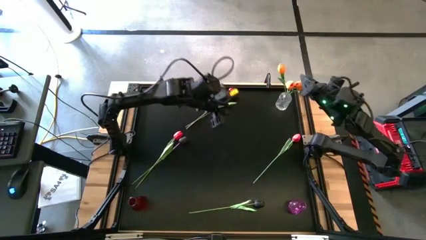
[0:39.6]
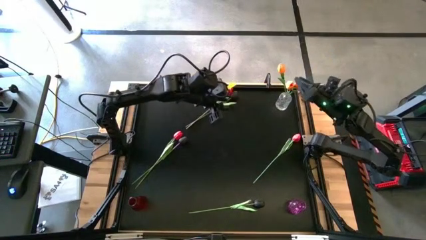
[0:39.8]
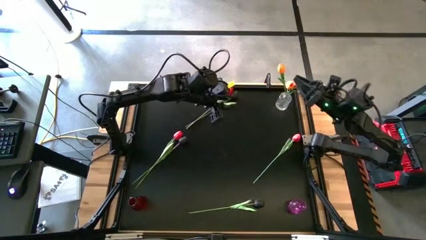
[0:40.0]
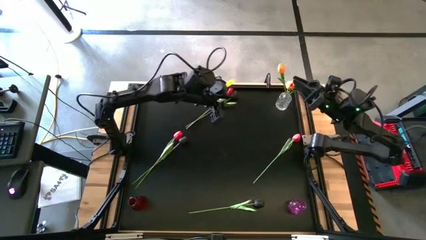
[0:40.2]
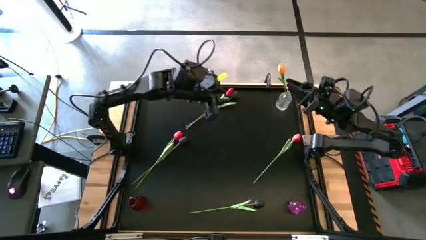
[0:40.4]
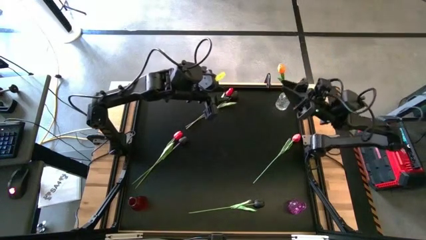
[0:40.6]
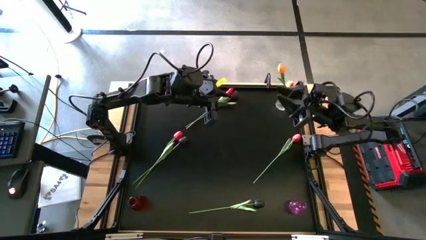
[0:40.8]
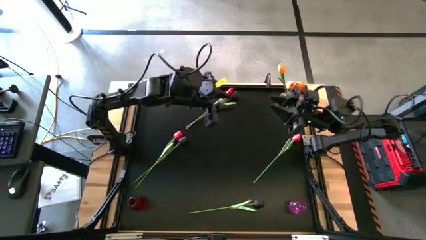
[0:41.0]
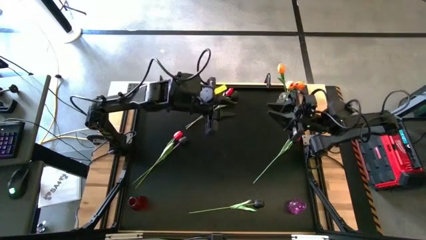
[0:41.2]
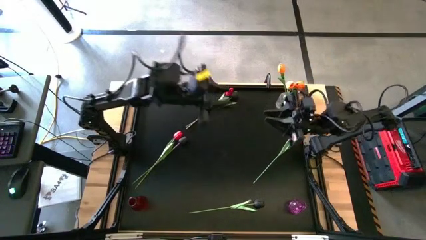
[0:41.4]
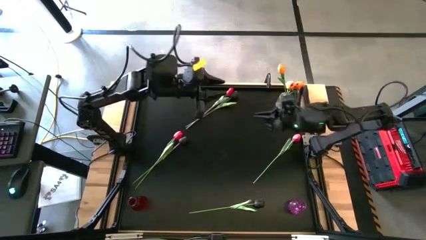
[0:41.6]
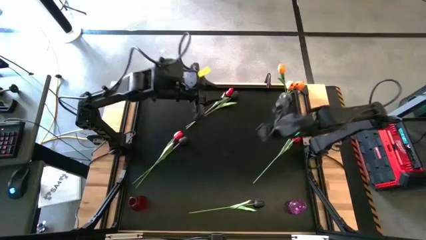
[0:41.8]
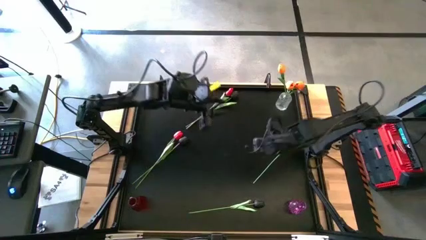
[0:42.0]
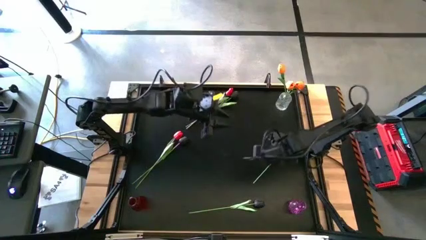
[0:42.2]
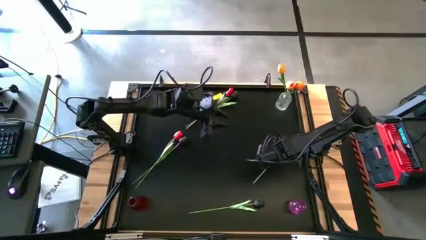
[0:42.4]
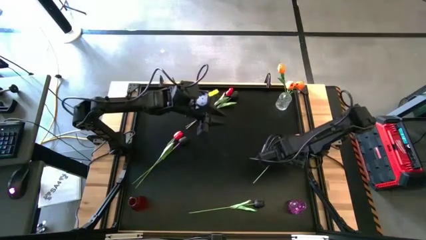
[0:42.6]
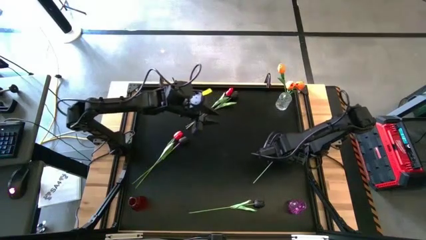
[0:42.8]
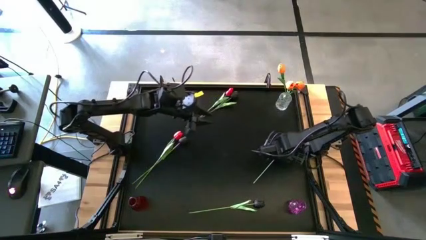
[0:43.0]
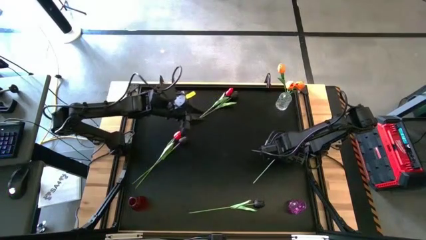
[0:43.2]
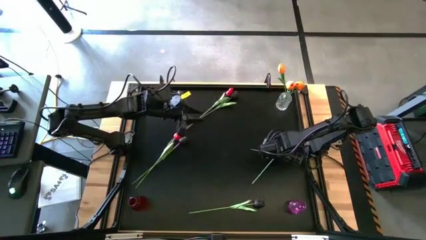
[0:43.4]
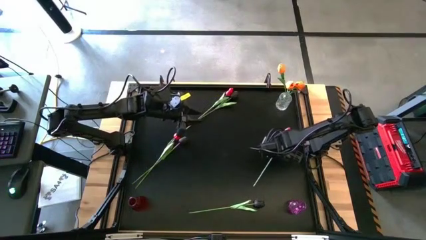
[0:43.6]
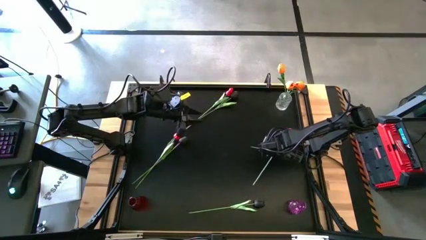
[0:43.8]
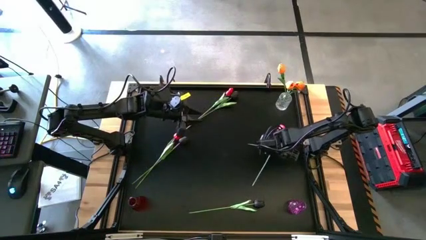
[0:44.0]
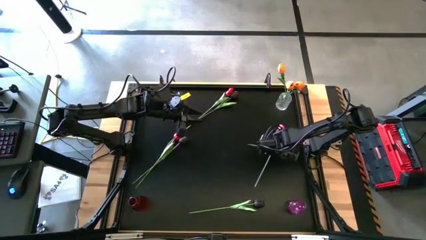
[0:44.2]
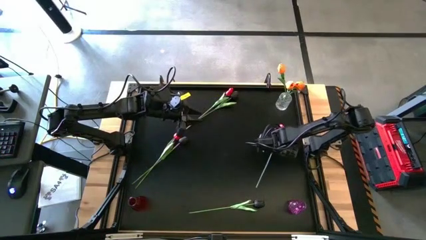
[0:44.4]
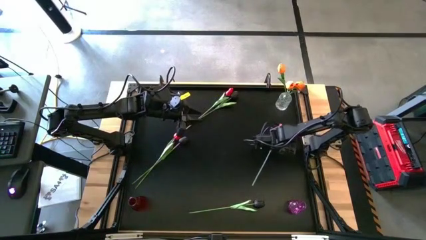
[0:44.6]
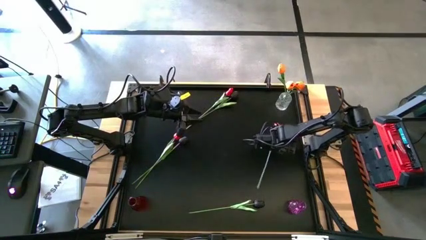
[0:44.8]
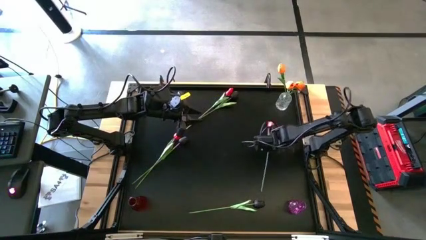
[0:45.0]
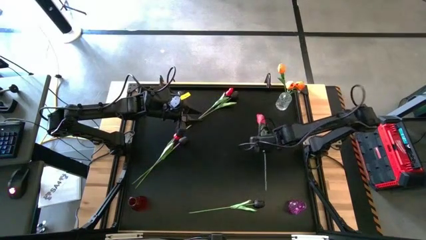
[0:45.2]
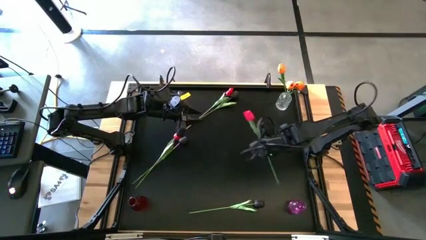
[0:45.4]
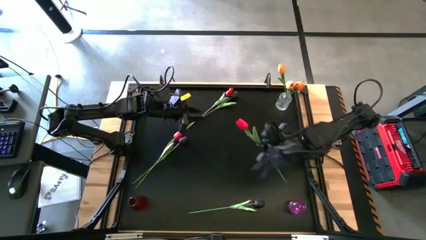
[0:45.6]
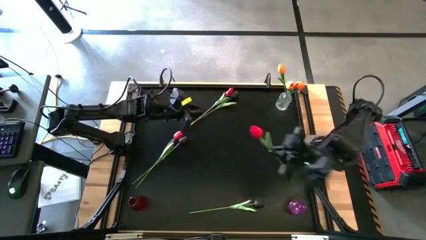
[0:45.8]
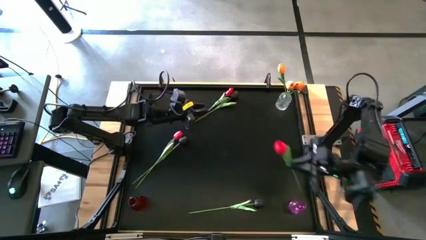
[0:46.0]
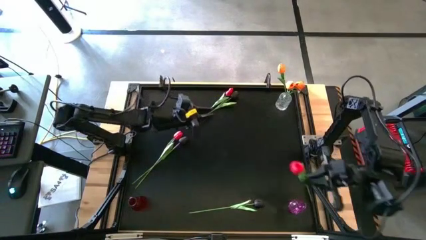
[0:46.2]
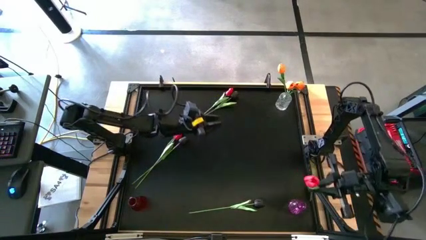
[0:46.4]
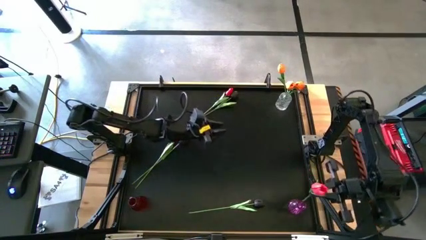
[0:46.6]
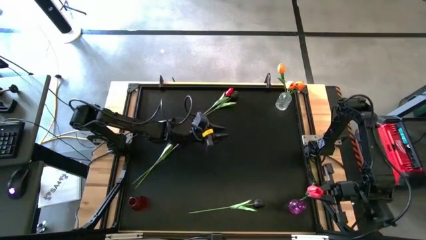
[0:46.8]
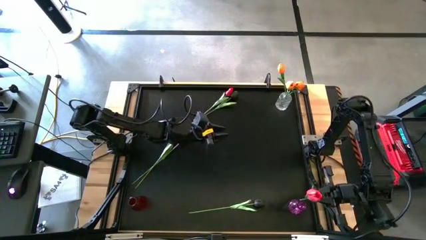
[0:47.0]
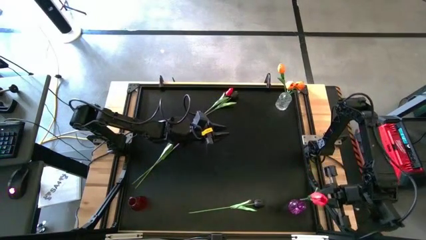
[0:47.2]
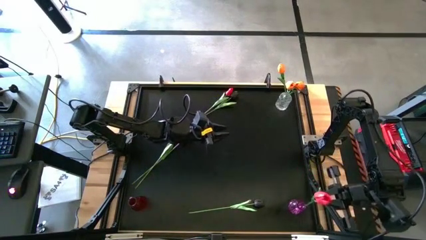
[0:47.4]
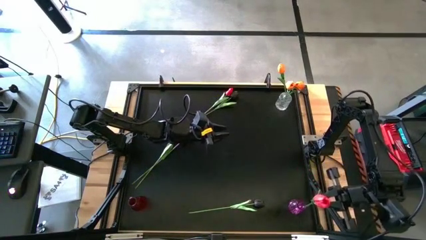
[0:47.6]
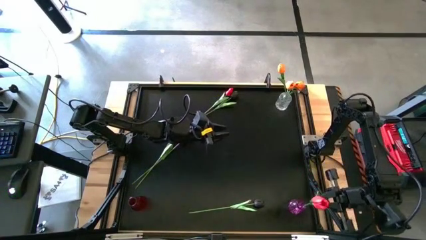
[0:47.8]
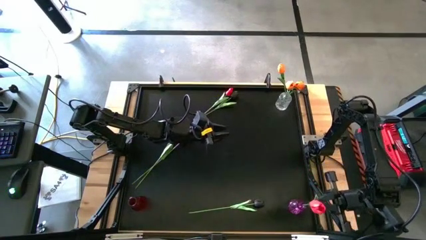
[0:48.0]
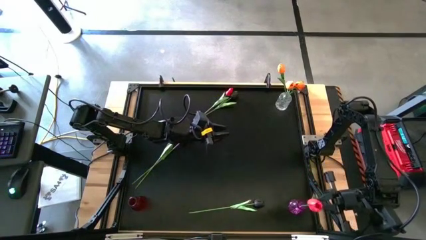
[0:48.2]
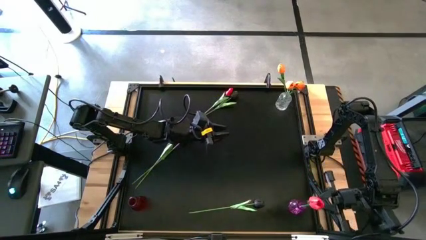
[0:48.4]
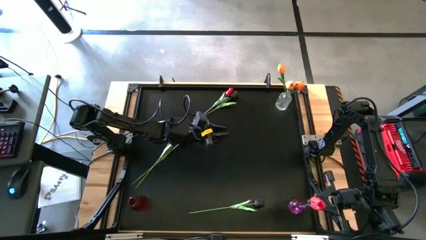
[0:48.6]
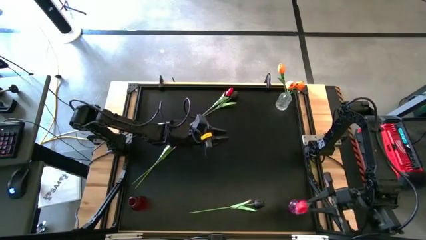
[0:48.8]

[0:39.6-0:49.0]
Task: Sort flowers into vase by color
Put the right red tulip into the violet flower vase

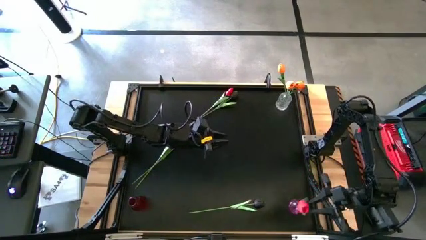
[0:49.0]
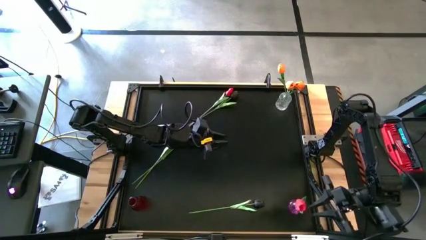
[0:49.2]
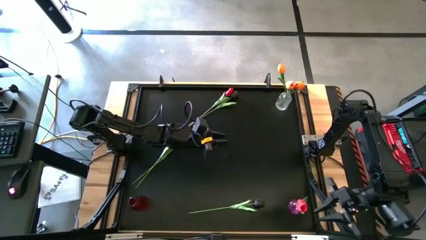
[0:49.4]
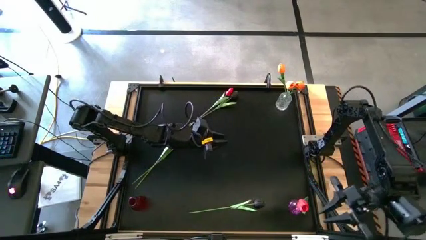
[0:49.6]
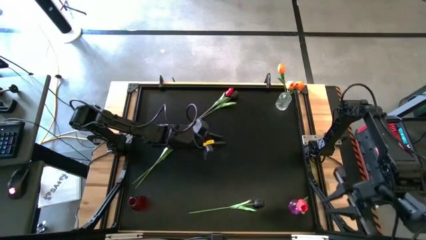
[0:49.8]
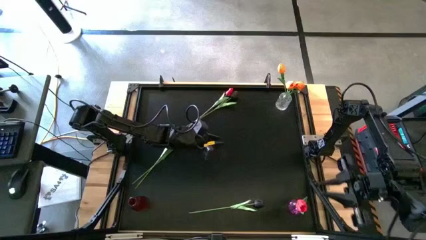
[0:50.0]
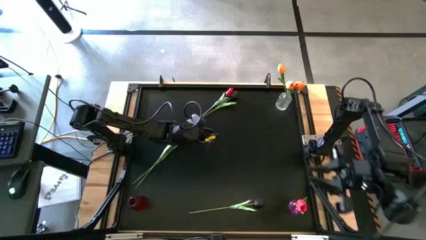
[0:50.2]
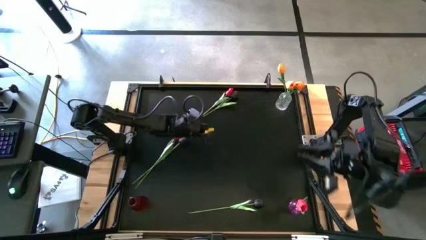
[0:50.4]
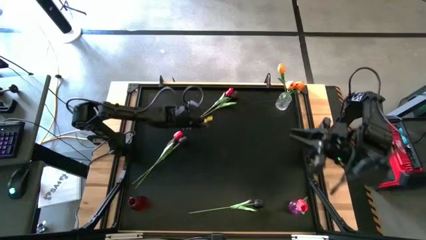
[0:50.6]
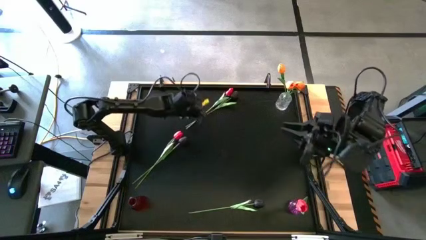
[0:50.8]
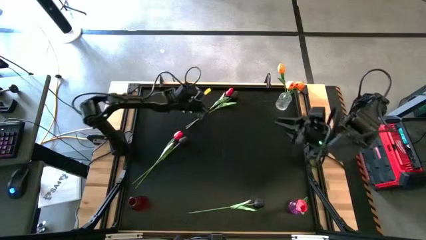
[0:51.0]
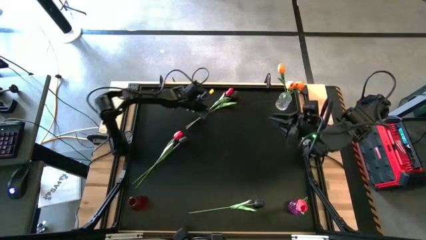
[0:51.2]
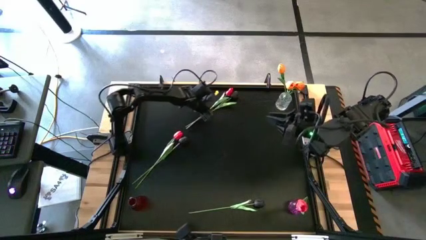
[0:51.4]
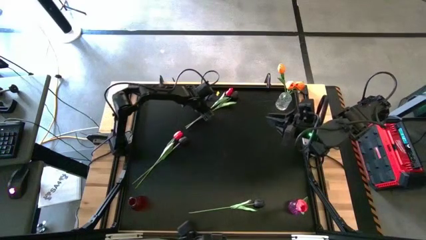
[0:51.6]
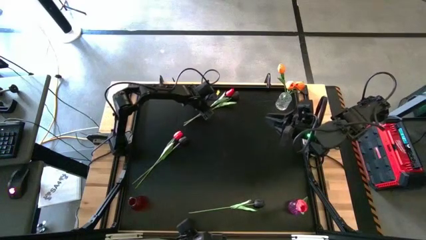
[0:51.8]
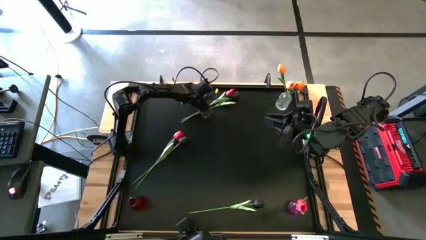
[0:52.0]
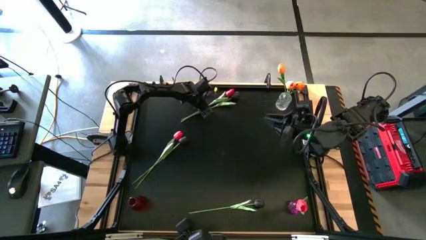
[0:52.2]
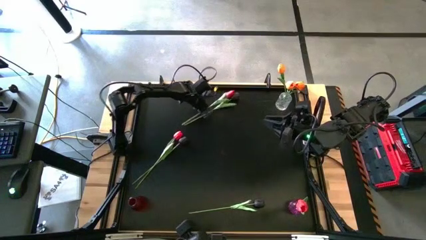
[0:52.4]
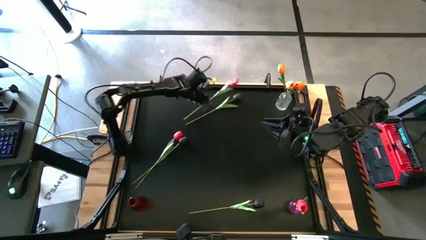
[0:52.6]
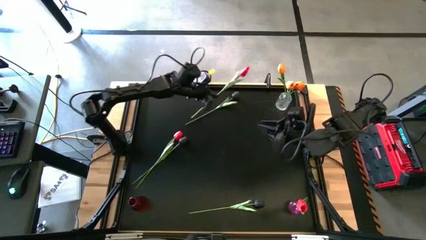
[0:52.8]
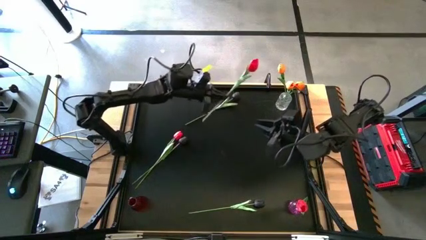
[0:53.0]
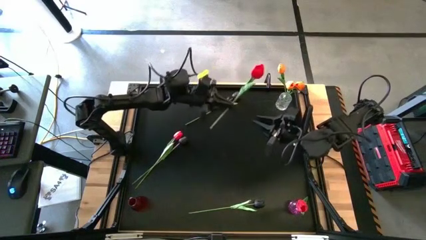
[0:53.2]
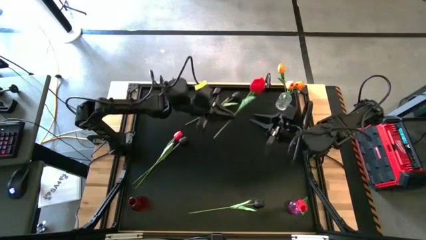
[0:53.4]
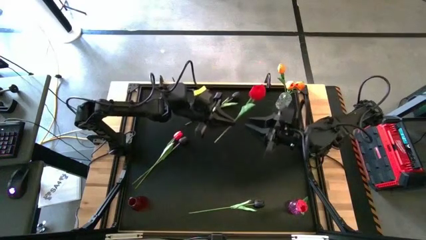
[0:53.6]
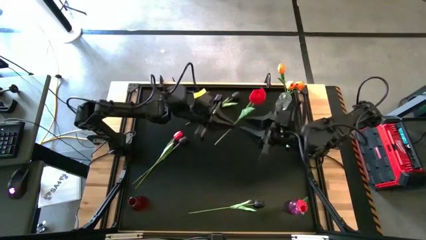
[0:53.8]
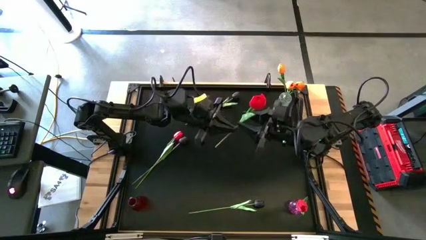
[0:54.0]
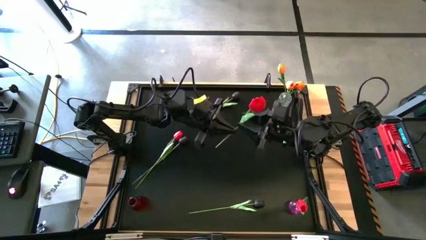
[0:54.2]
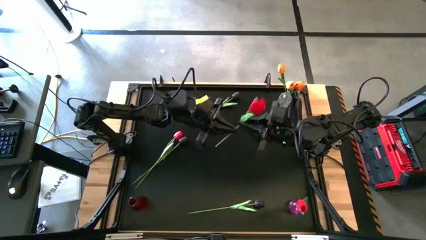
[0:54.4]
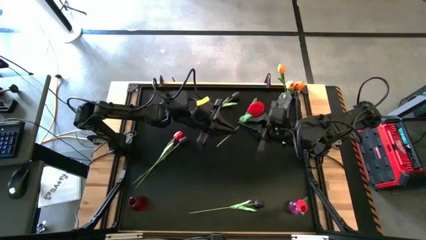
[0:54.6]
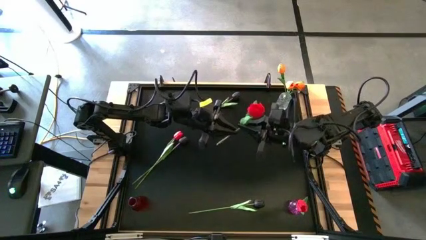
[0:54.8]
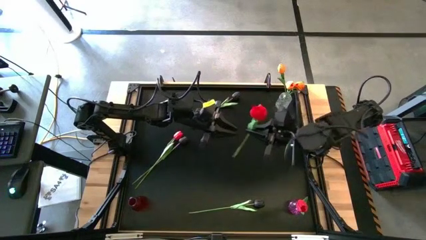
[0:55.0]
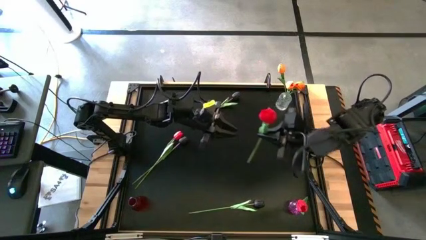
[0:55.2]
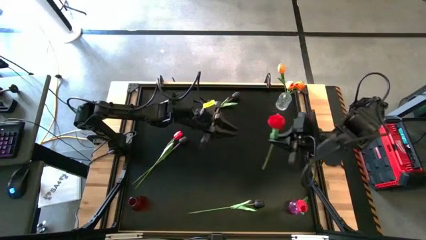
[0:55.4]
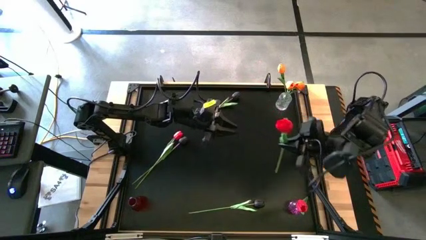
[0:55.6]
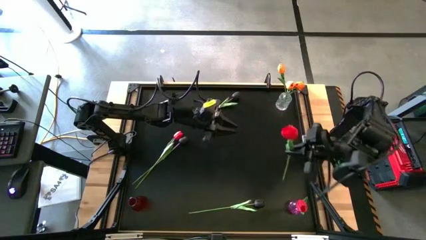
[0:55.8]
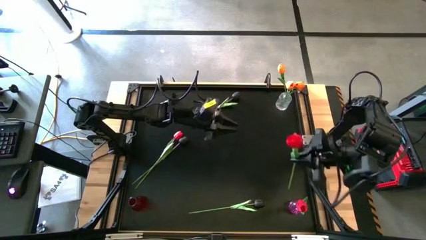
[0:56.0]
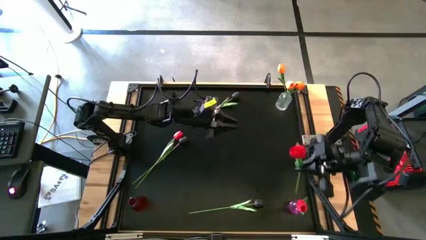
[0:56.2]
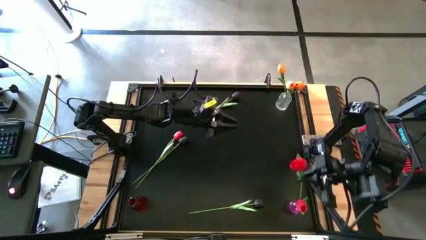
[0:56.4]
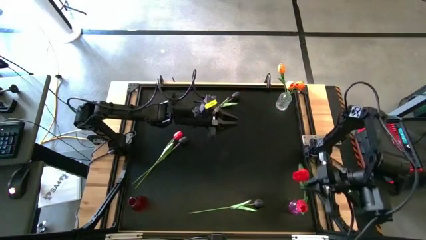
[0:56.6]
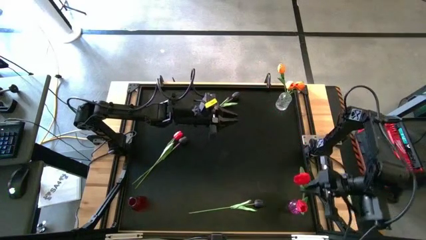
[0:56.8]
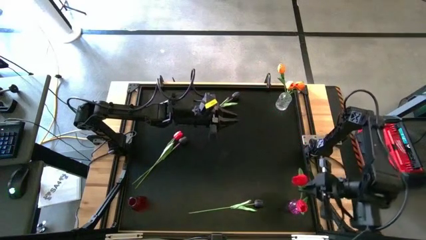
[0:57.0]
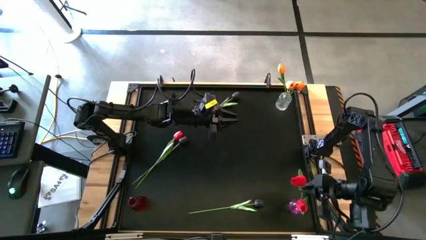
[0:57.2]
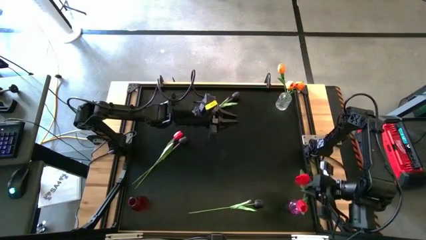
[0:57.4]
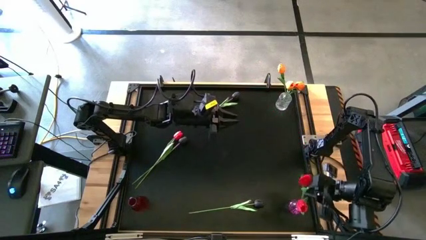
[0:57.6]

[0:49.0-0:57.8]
Put the top red tulip into the violet flower vase
